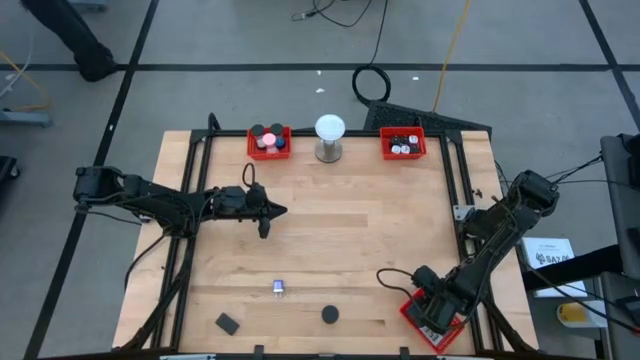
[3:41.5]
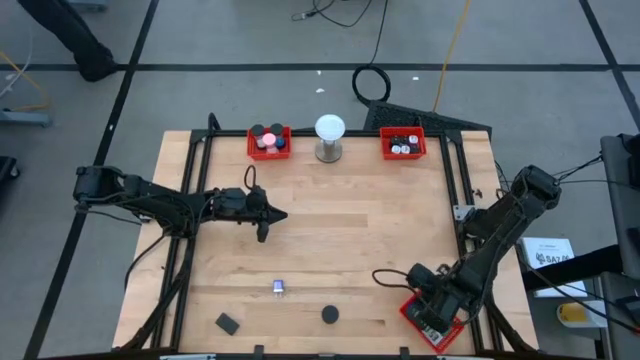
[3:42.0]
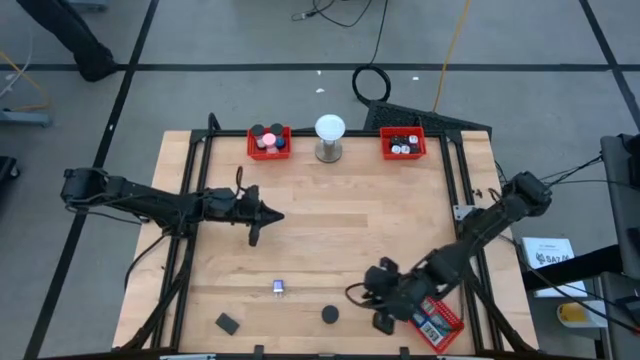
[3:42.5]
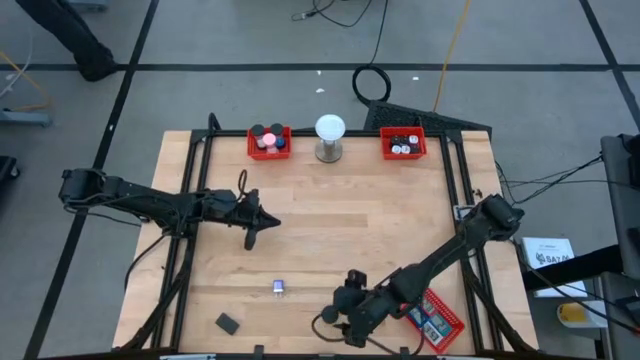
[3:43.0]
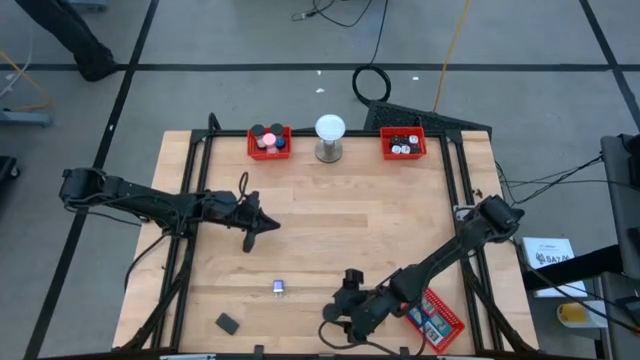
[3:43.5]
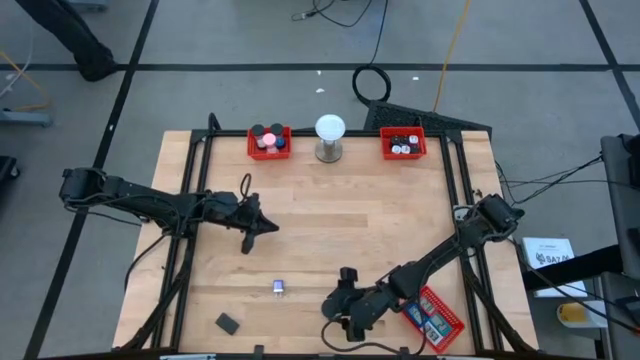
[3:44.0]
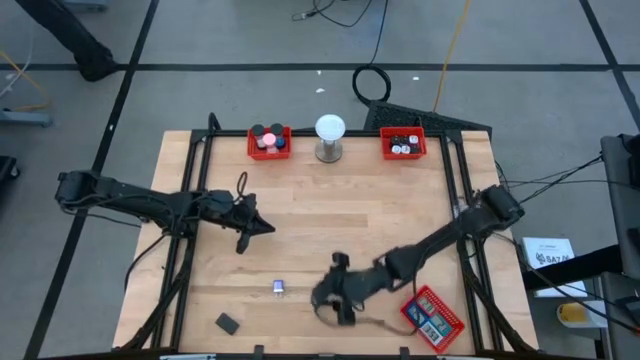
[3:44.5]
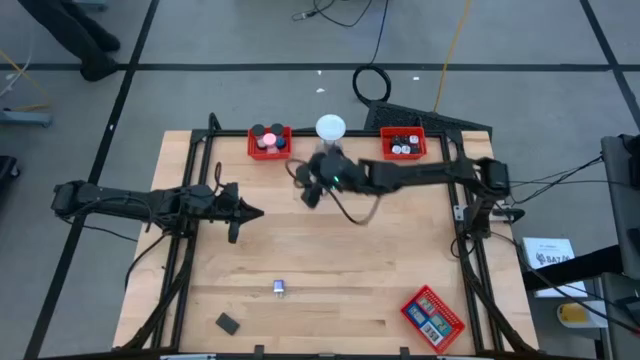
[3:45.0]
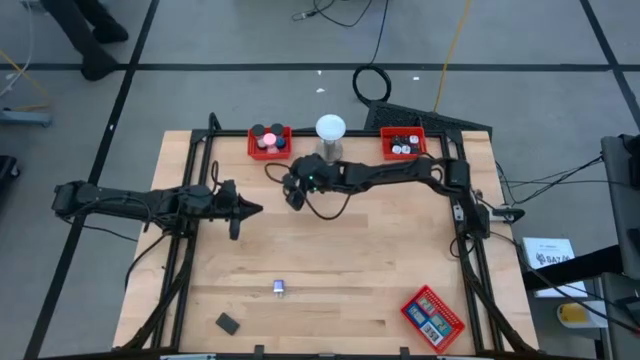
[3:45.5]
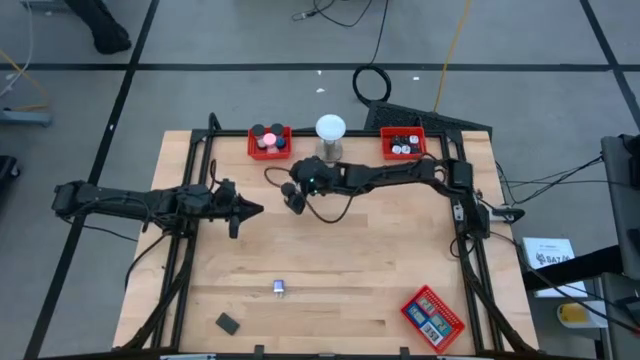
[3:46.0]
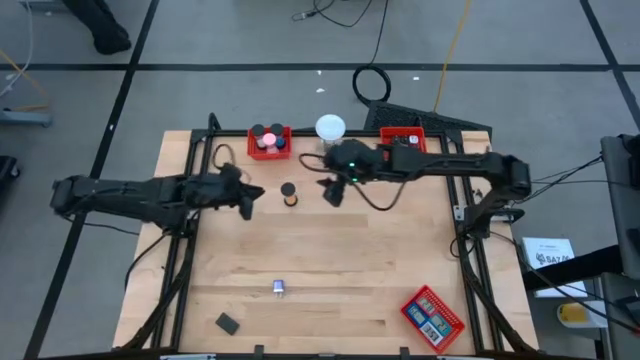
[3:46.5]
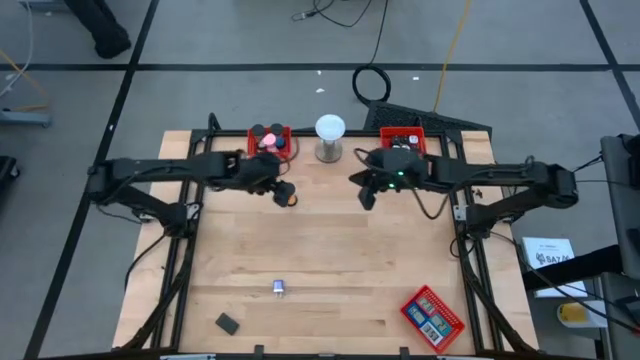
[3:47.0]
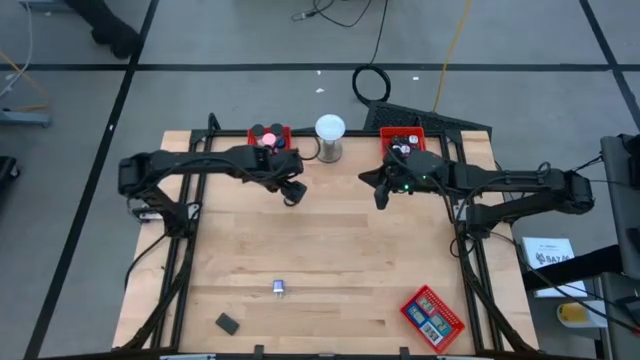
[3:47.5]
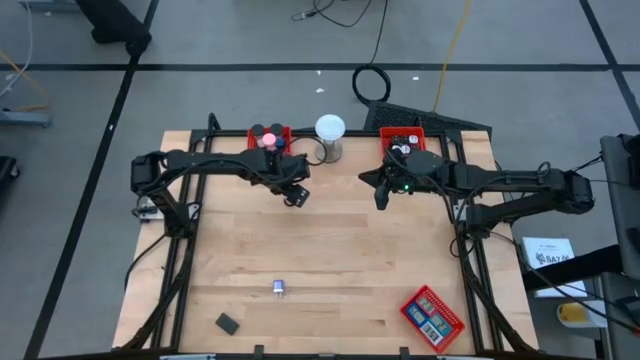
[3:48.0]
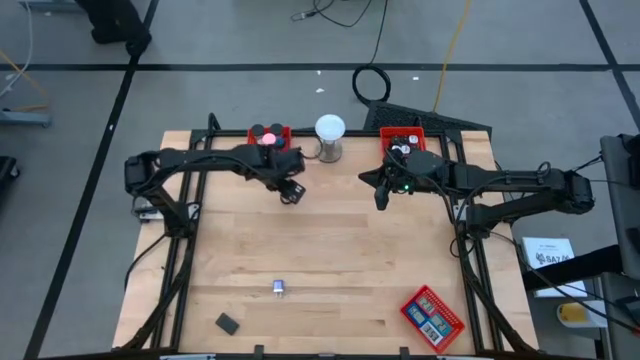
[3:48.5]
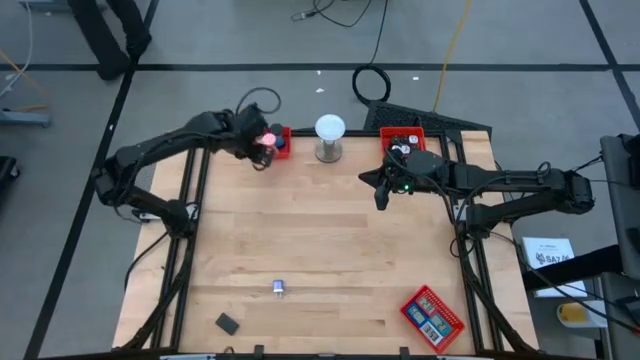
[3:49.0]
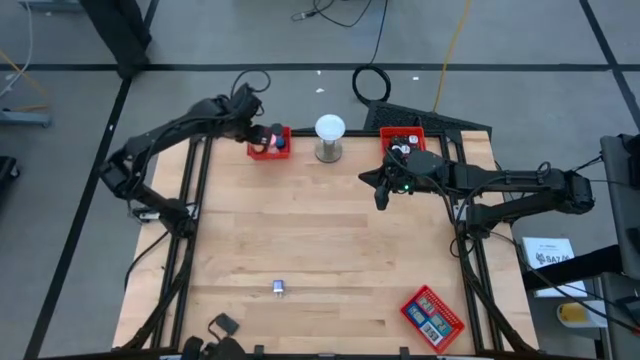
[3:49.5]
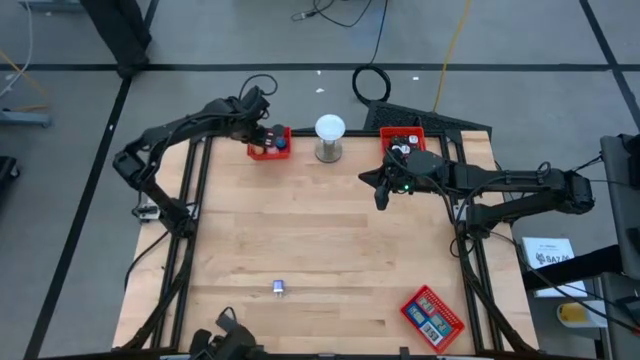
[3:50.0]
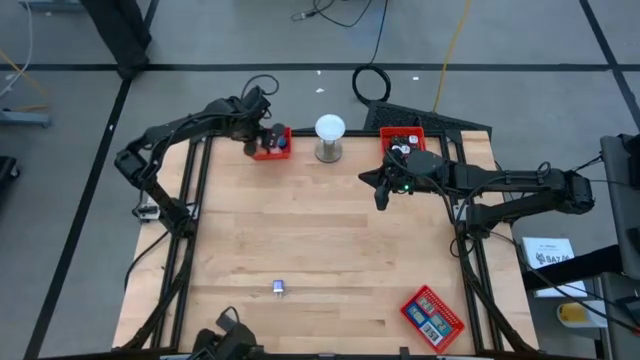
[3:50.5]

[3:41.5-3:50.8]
Task: Pick & Place Office items
Put the orange hourglass into the top left red bin

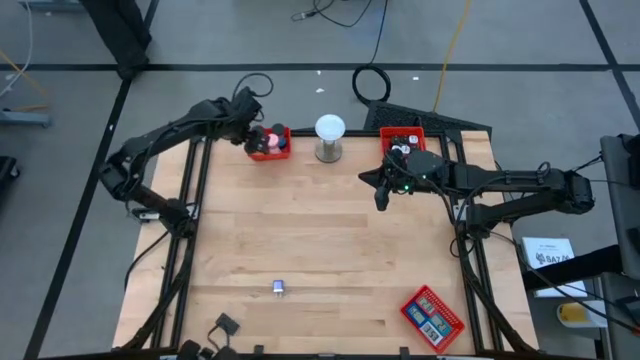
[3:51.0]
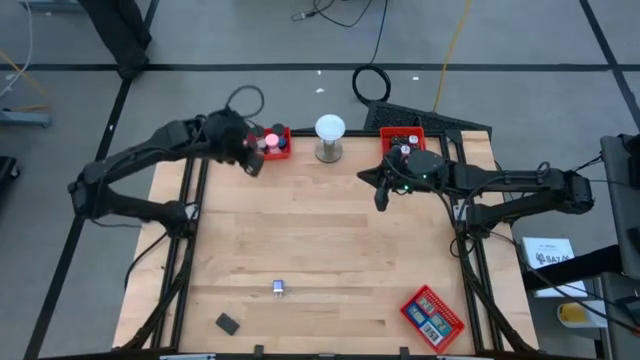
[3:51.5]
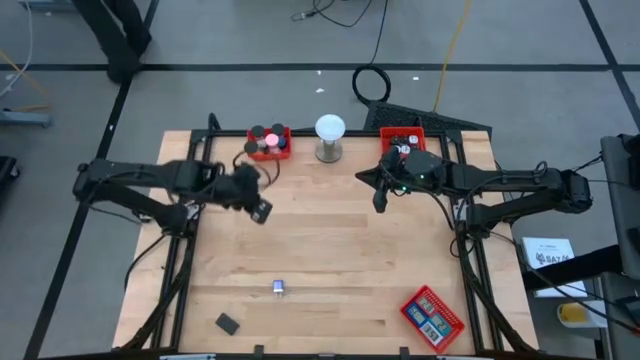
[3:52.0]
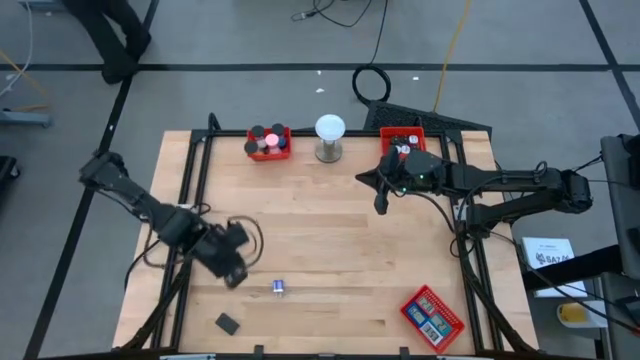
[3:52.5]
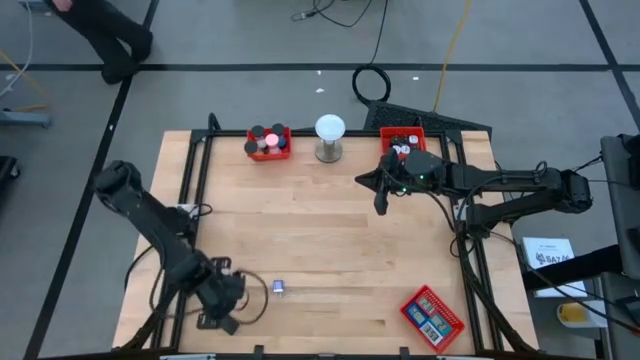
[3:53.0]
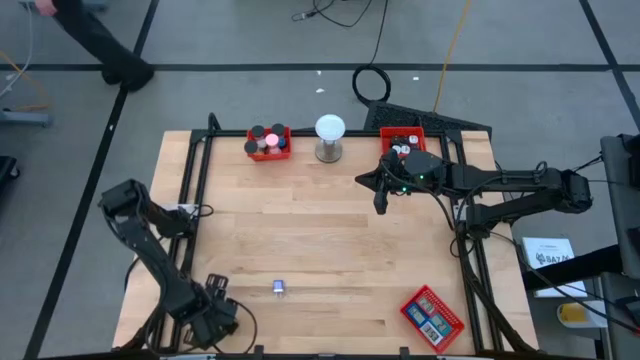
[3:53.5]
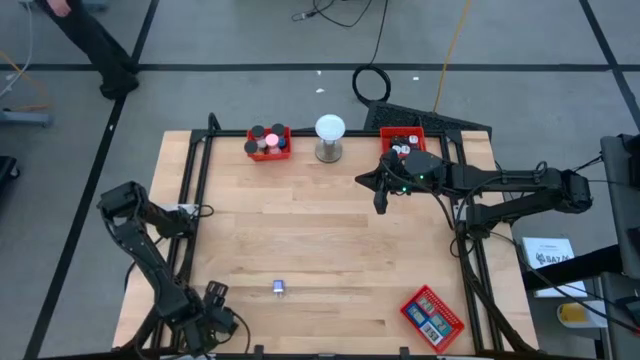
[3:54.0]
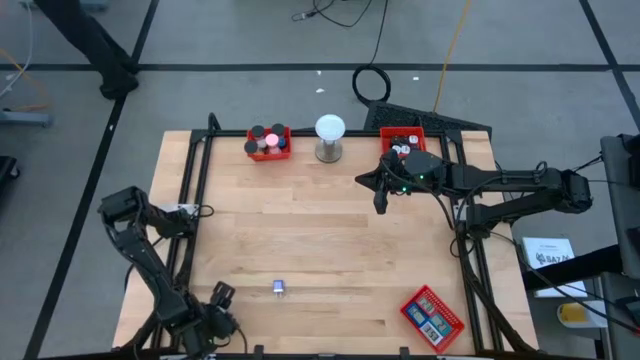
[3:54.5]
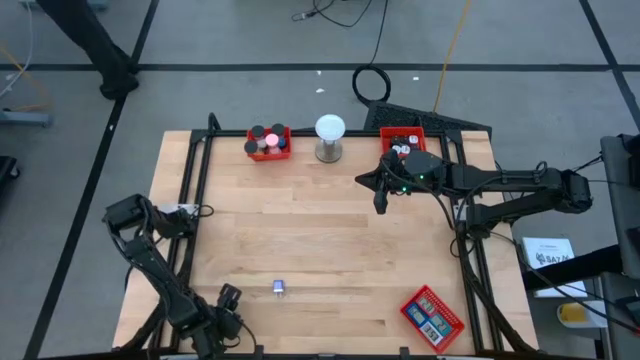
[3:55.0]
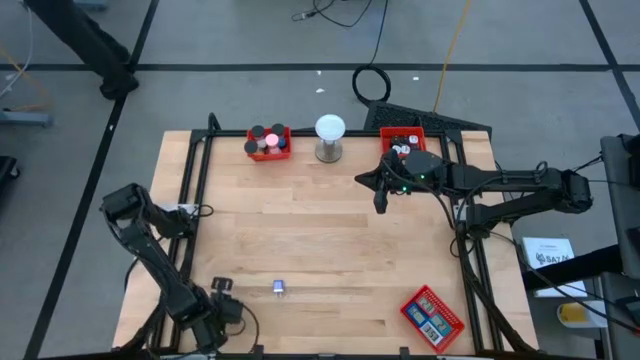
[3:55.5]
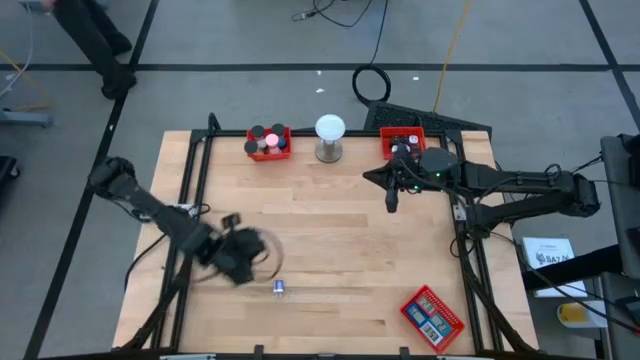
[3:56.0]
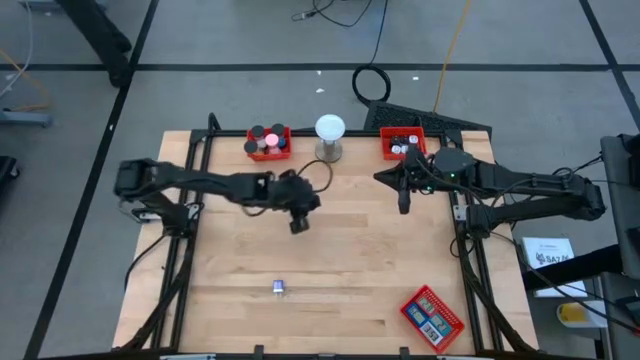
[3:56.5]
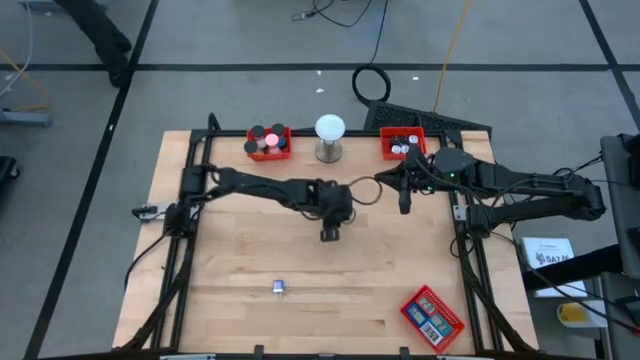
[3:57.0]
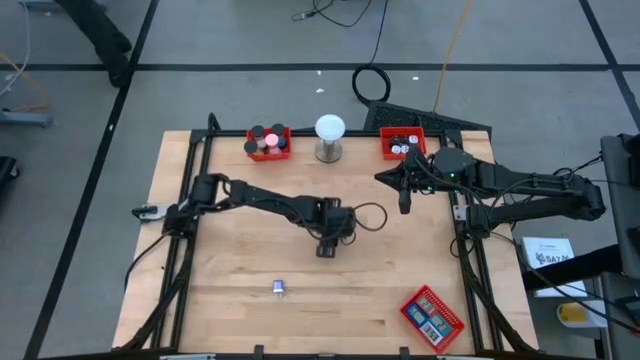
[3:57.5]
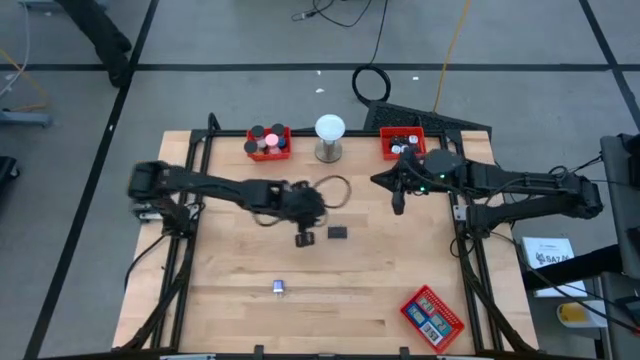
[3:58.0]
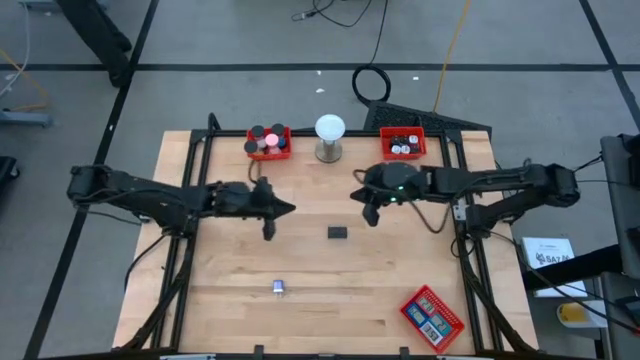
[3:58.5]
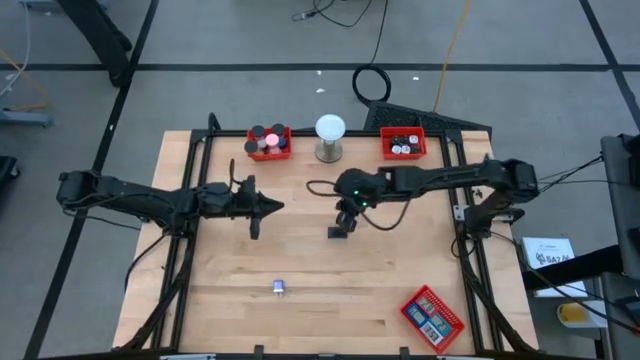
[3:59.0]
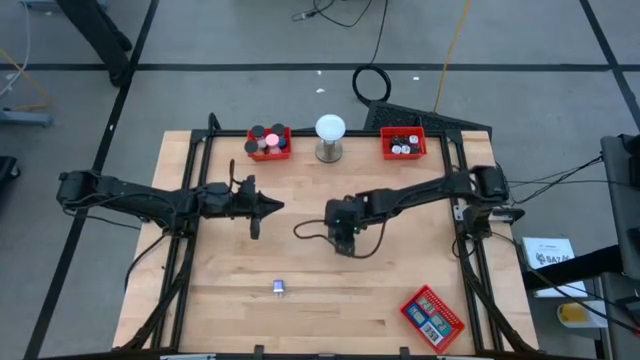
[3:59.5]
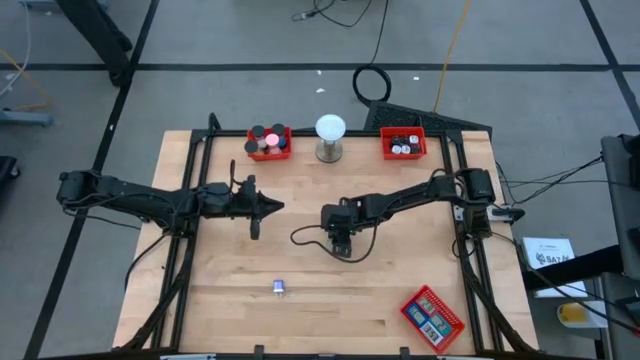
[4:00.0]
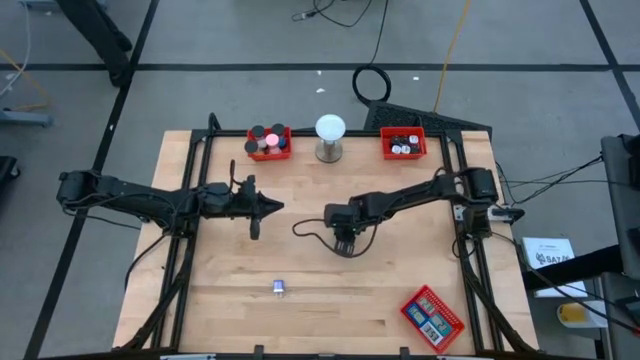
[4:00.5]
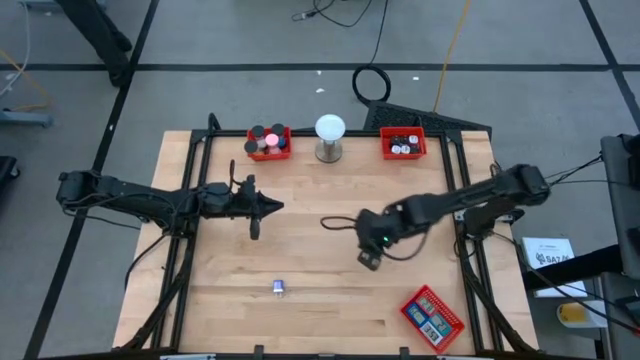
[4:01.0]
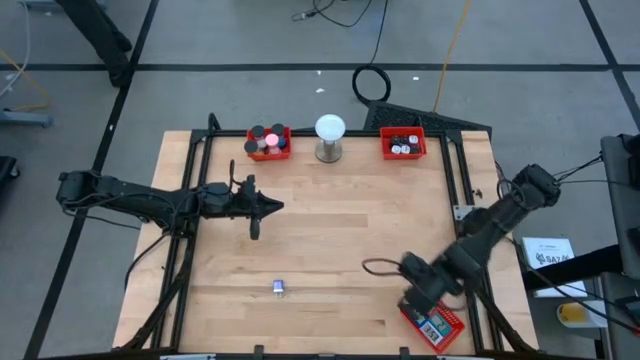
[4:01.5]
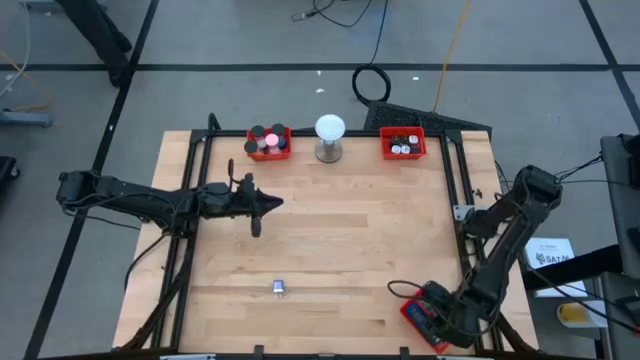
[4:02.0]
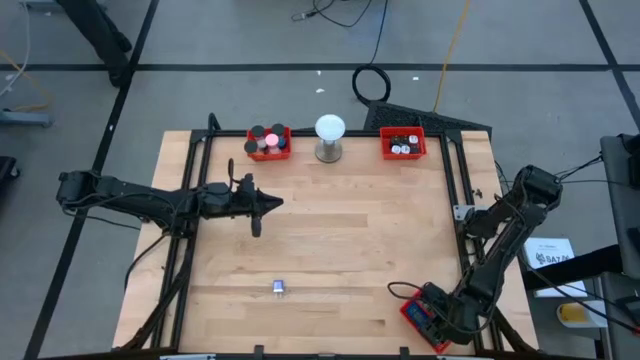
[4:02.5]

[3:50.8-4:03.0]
Put the black digital clock into the bottom right red bin
